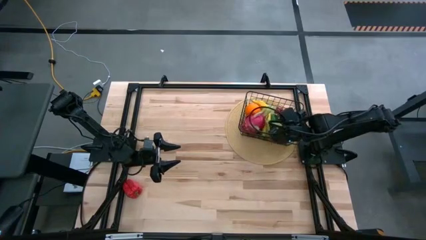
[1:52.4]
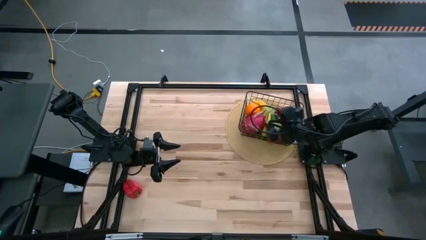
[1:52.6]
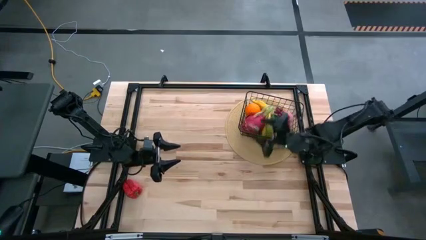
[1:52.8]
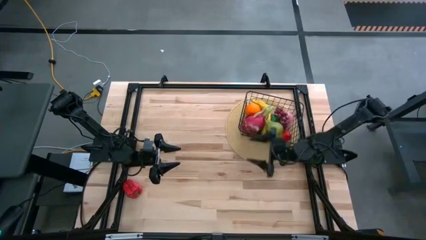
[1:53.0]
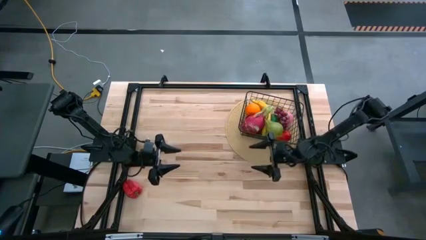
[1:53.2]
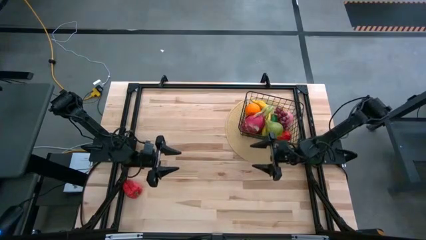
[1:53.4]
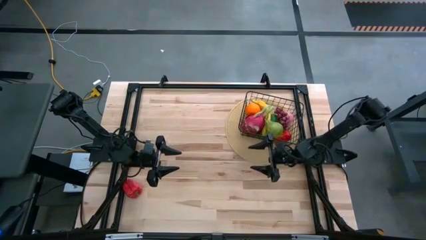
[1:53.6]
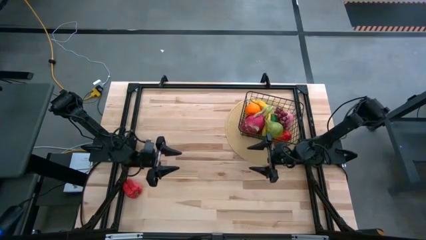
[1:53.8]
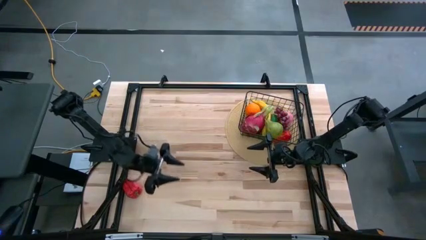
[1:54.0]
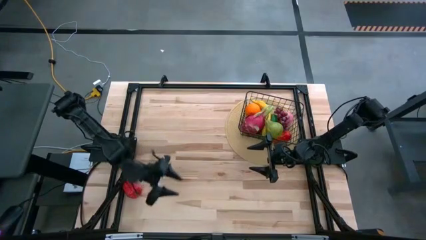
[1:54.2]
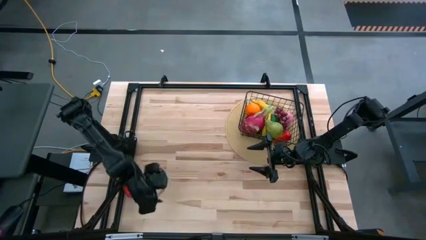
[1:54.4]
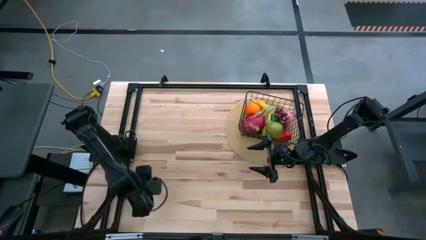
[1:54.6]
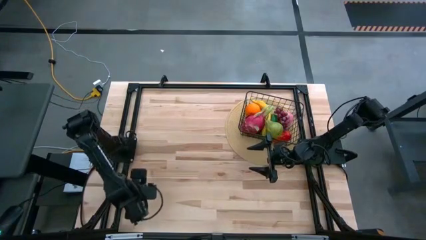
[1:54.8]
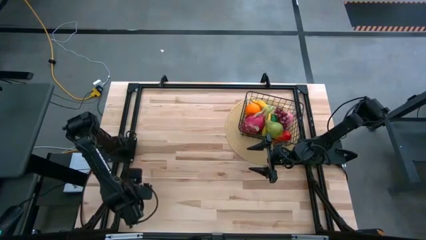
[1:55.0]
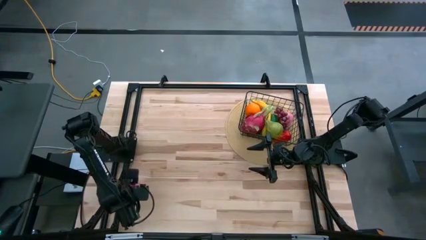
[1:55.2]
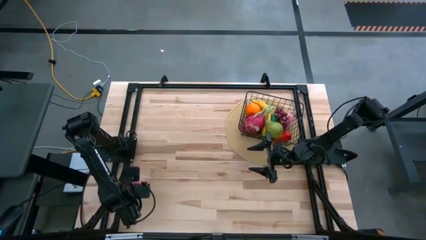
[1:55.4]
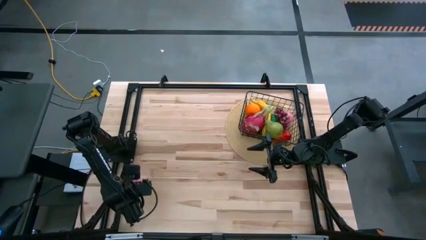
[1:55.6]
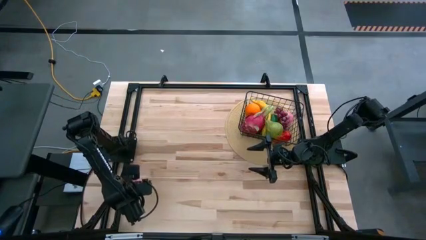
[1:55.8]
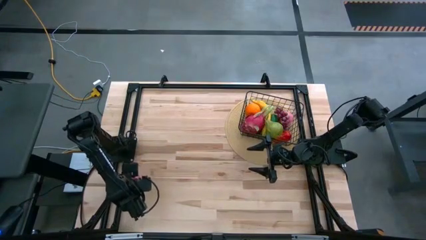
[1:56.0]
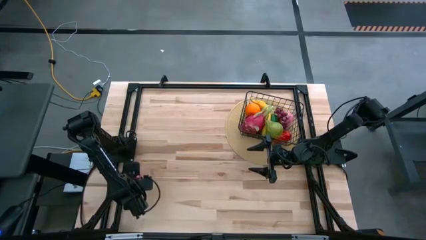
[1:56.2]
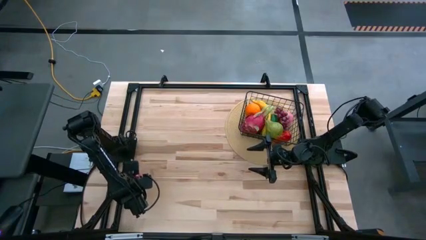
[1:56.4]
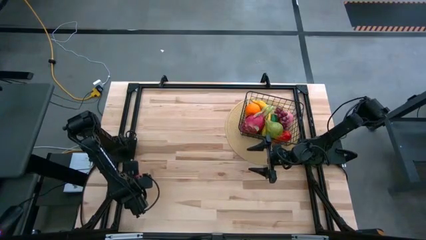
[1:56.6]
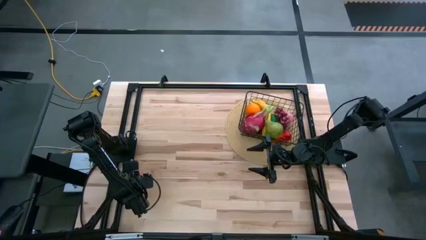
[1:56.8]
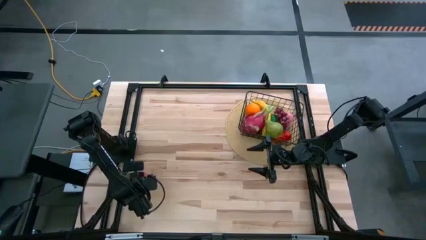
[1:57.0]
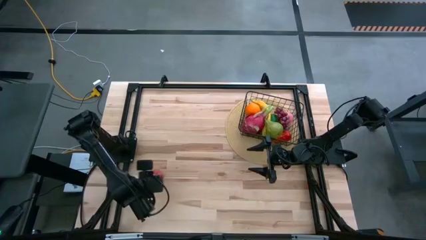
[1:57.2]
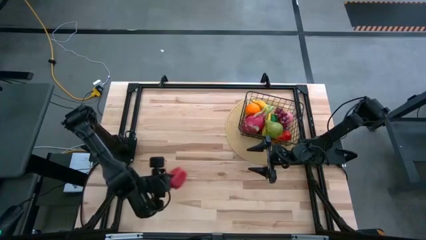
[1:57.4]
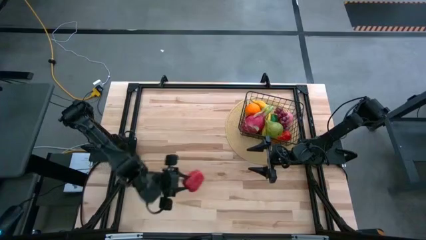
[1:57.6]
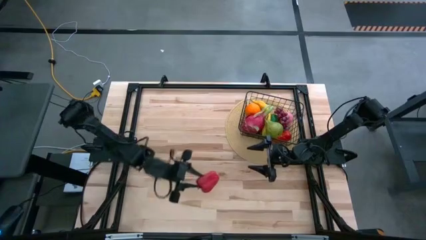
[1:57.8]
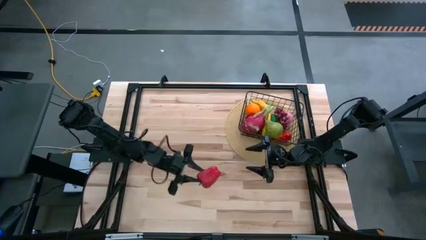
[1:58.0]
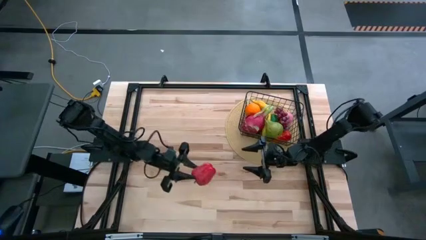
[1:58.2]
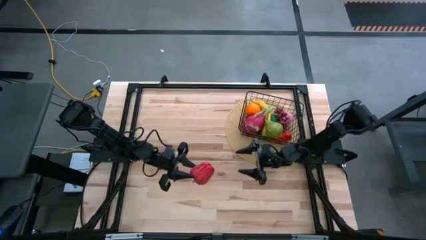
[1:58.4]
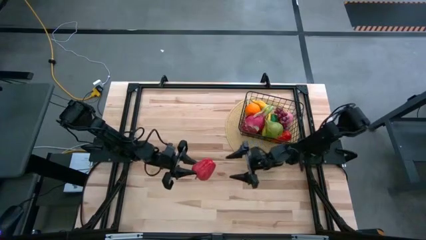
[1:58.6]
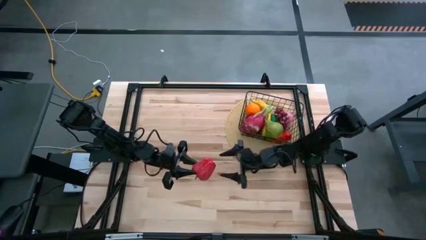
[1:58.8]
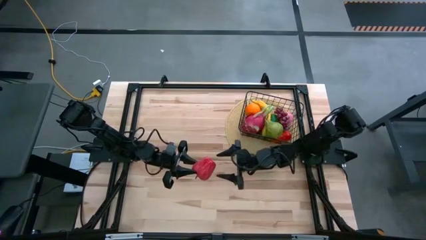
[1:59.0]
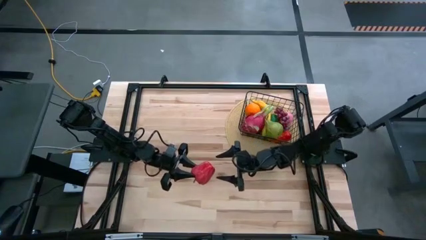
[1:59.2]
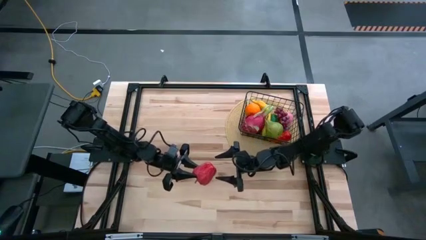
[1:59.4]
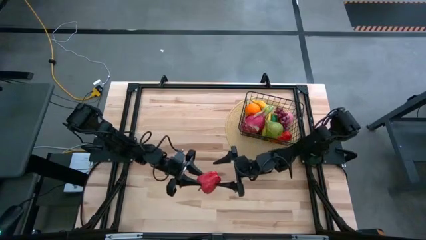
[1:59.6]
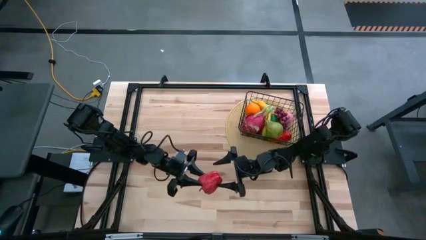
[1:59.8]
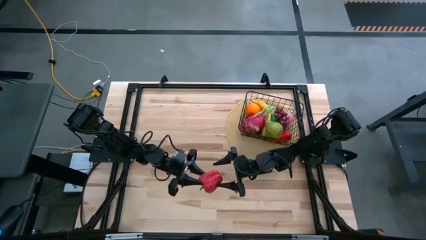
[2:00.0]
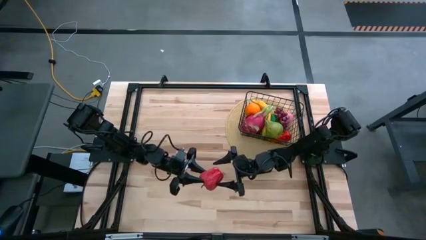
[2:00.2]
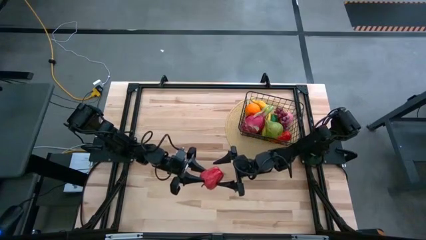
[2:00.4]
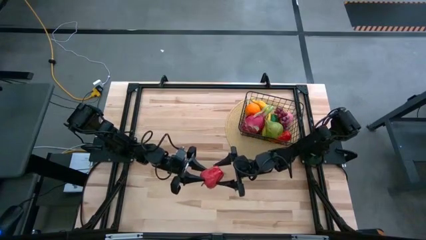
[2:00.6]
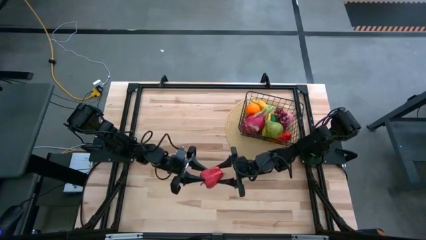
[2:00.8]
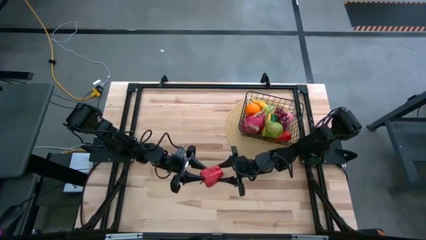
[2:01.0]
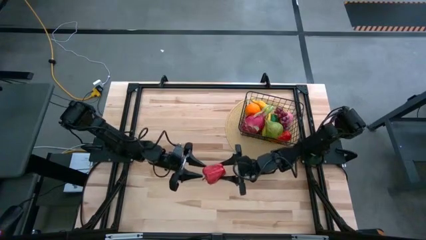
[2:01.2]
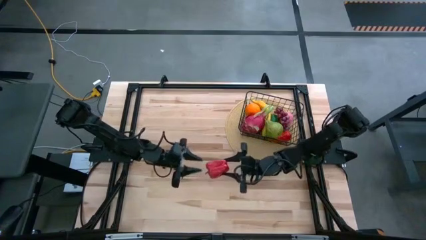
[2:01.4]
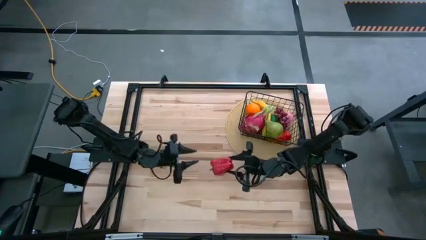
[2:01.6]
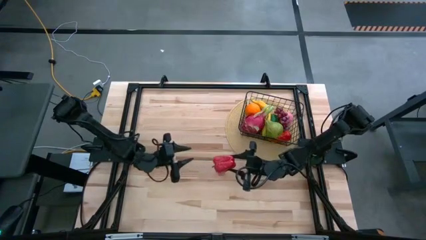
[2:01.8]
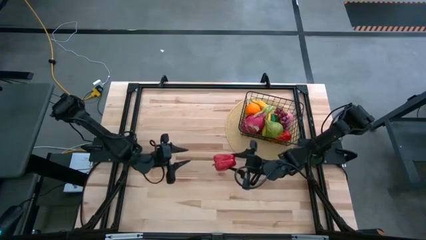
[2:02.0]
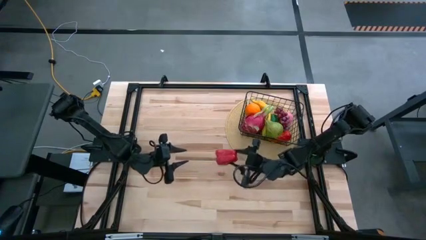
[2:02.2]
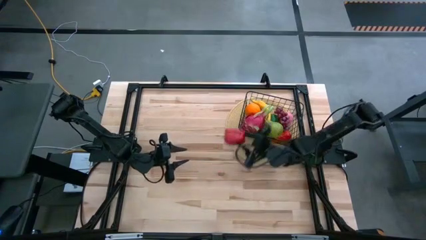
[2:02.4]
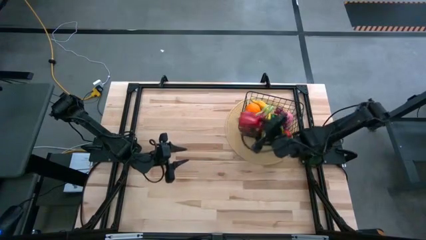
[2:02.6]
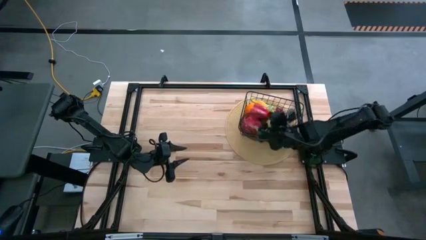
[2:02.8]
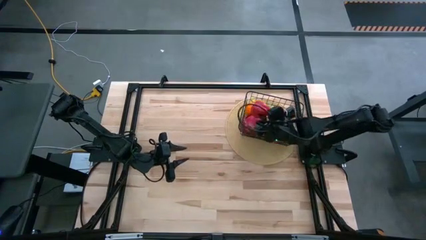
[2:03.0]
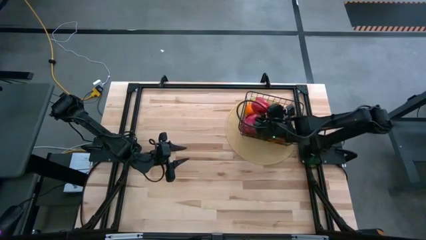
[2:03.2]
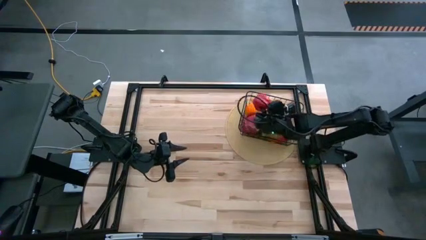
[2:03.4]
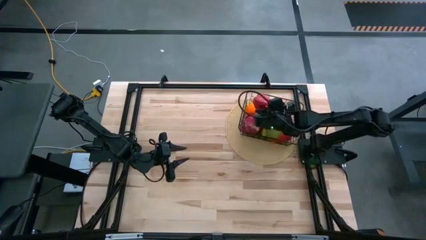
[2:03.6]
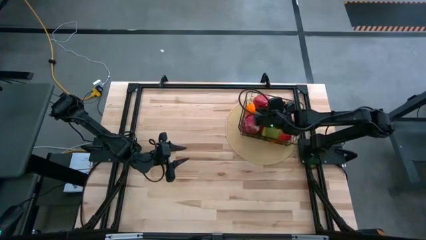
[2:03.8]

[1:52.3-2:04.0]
Task: Build produce basket
Put the bell pepper into the wire basket
